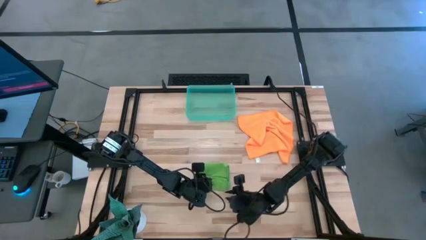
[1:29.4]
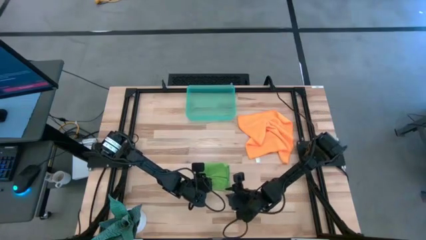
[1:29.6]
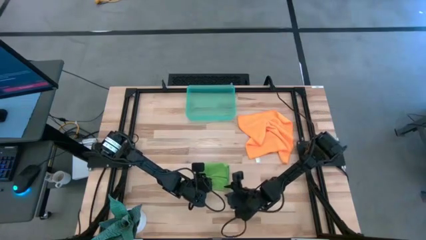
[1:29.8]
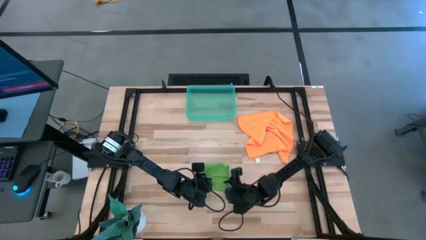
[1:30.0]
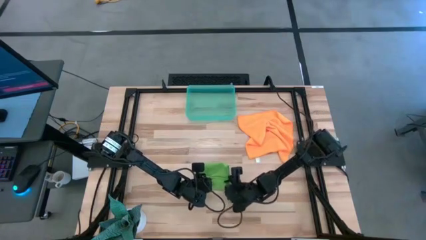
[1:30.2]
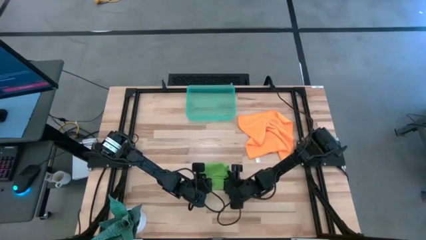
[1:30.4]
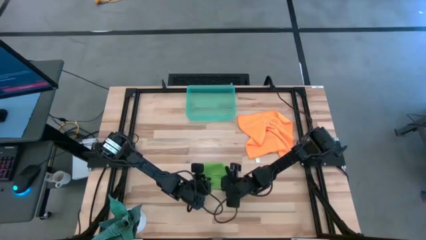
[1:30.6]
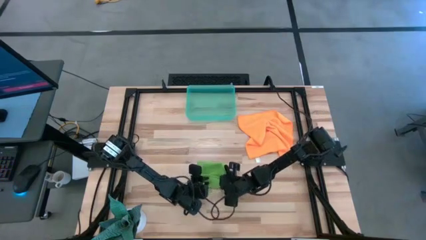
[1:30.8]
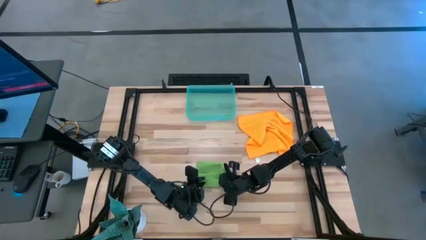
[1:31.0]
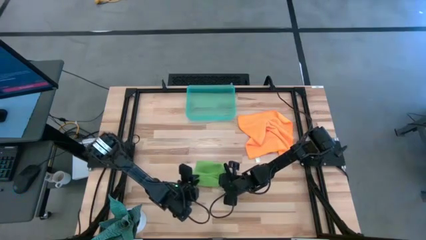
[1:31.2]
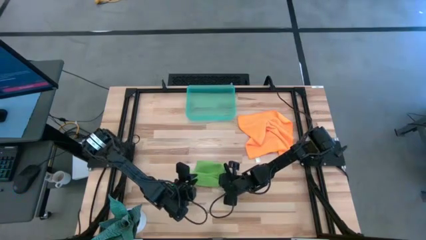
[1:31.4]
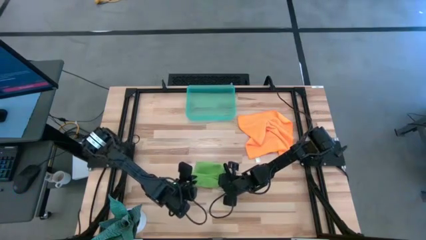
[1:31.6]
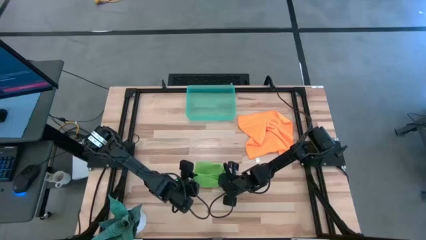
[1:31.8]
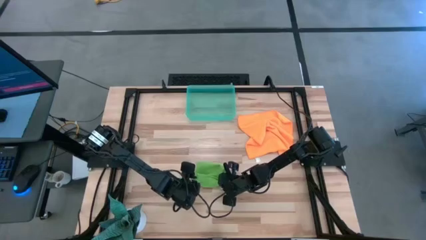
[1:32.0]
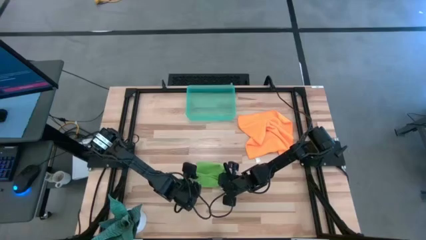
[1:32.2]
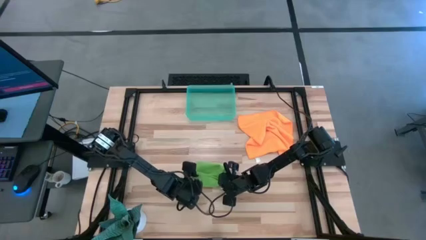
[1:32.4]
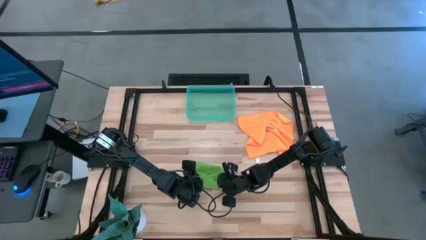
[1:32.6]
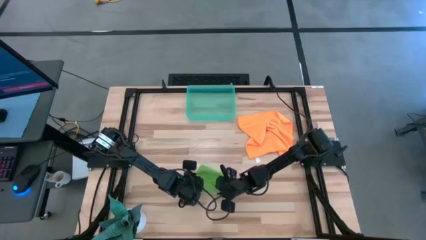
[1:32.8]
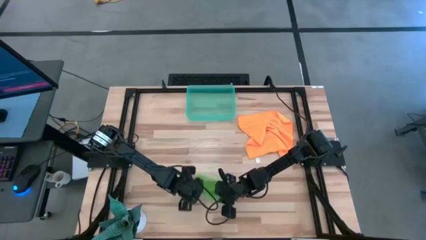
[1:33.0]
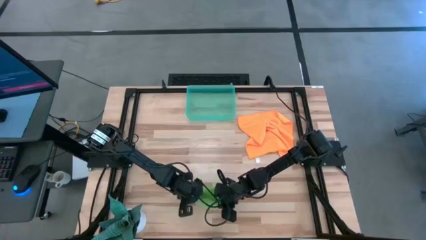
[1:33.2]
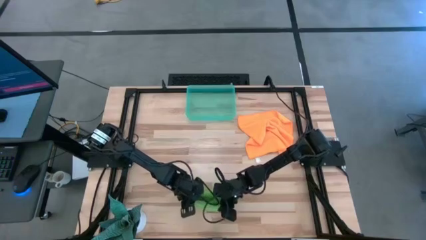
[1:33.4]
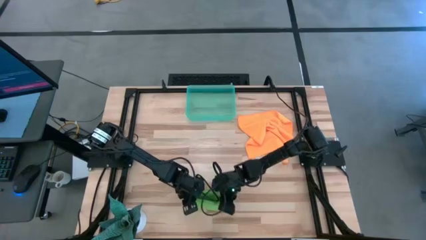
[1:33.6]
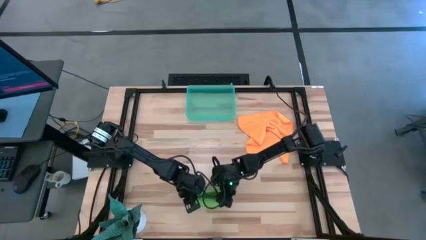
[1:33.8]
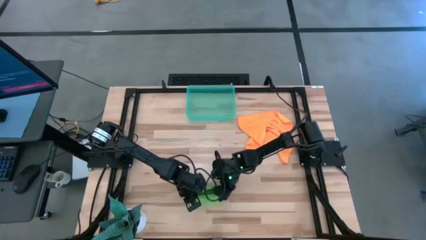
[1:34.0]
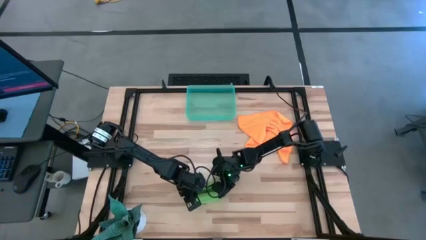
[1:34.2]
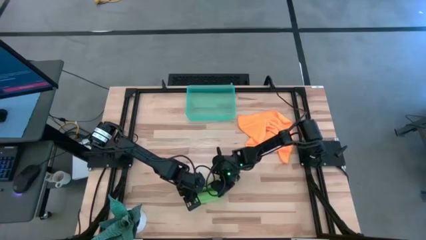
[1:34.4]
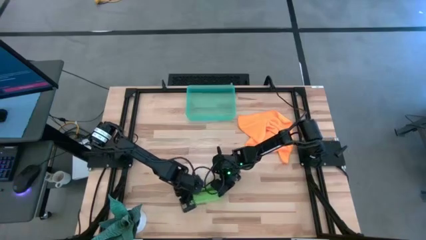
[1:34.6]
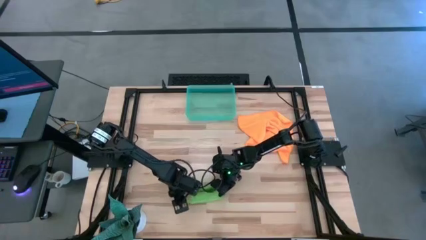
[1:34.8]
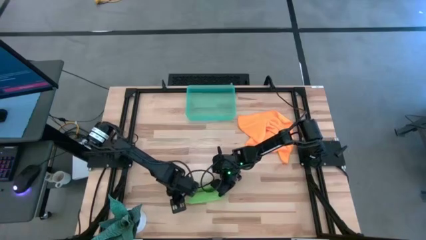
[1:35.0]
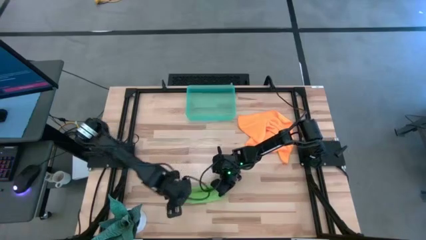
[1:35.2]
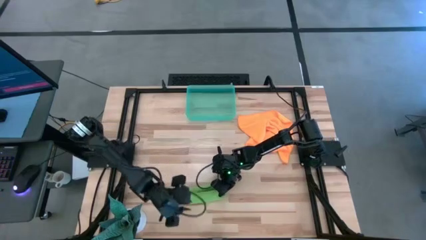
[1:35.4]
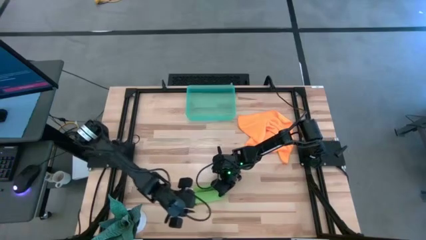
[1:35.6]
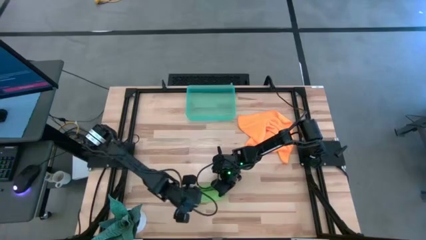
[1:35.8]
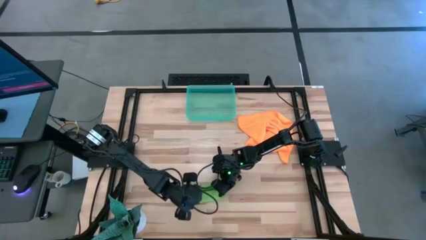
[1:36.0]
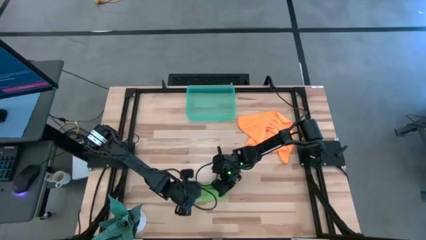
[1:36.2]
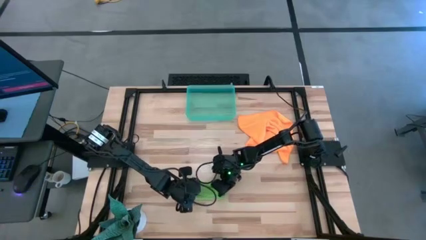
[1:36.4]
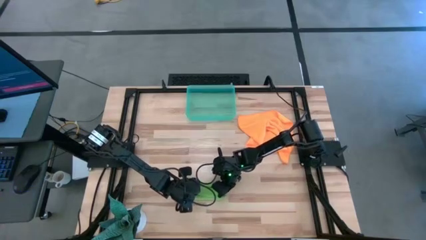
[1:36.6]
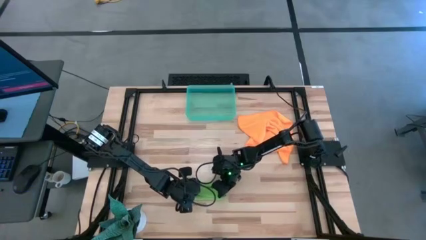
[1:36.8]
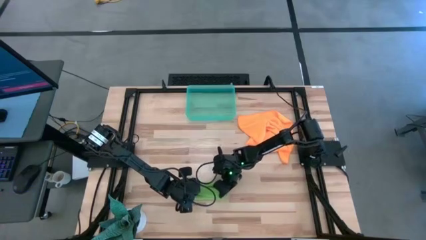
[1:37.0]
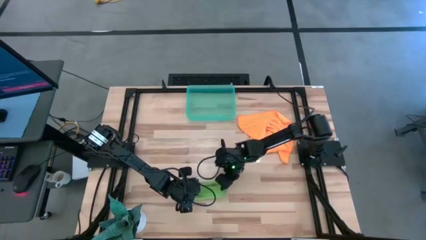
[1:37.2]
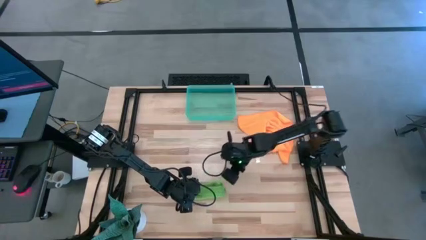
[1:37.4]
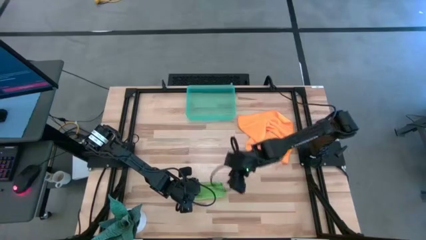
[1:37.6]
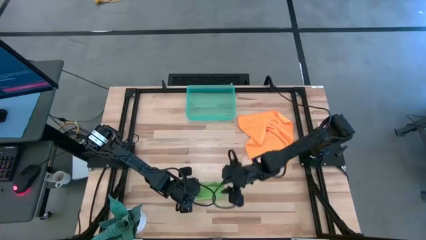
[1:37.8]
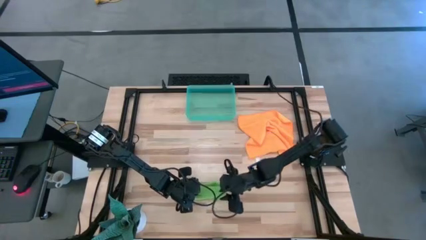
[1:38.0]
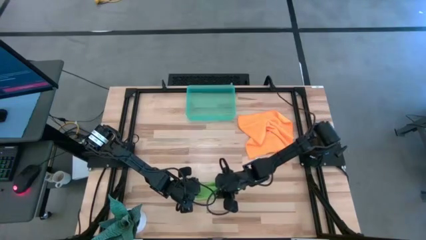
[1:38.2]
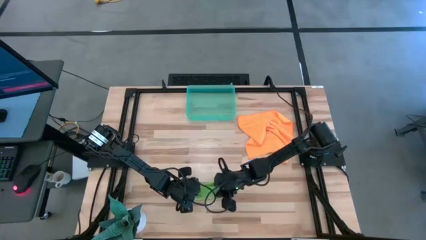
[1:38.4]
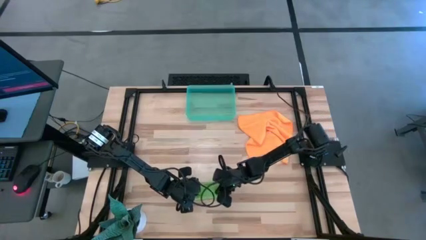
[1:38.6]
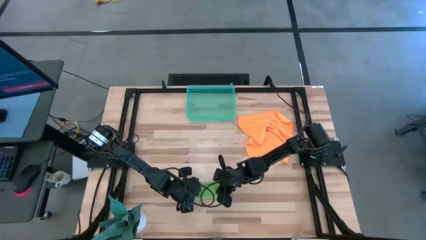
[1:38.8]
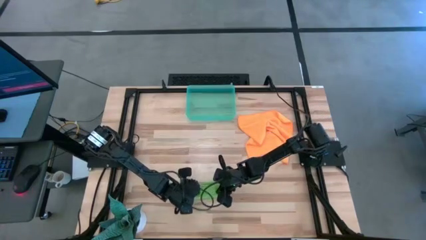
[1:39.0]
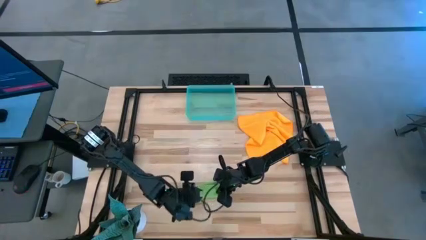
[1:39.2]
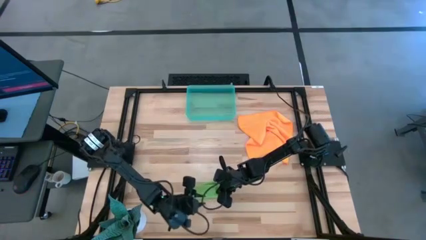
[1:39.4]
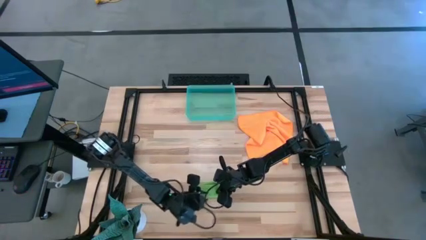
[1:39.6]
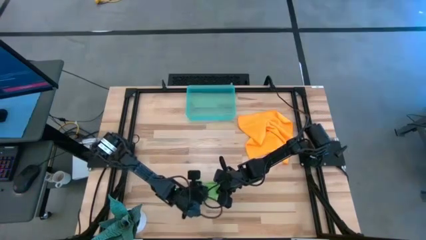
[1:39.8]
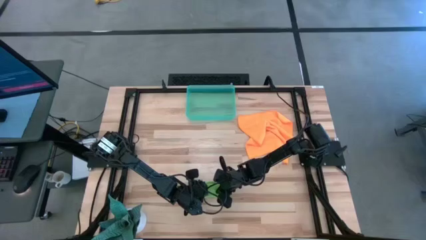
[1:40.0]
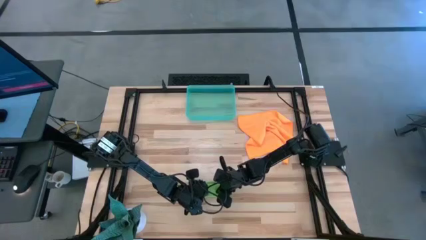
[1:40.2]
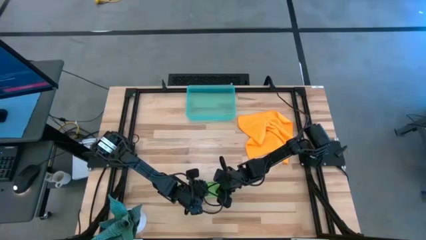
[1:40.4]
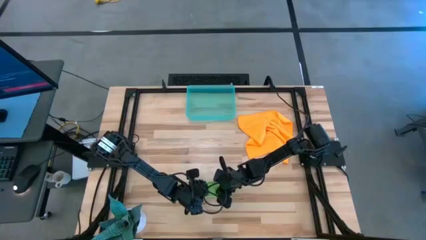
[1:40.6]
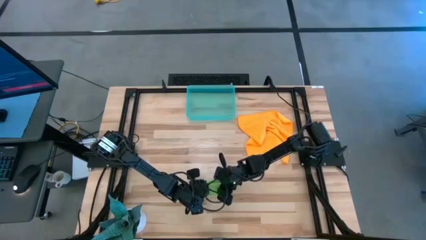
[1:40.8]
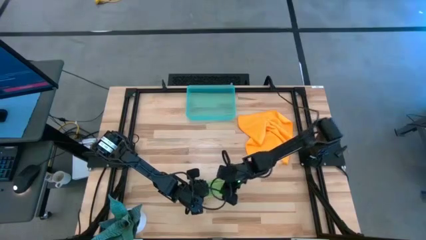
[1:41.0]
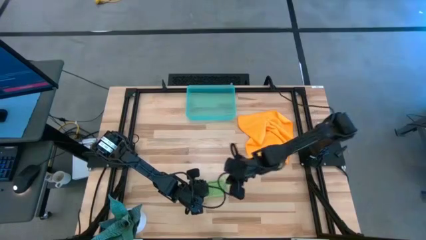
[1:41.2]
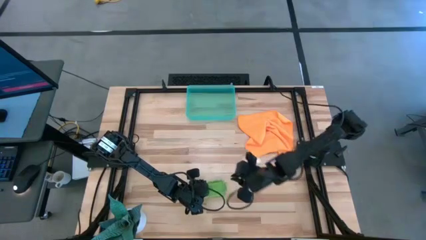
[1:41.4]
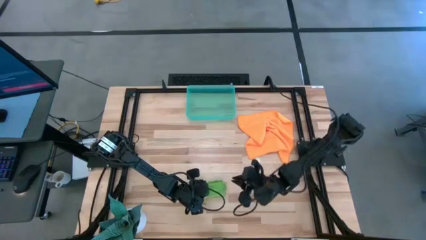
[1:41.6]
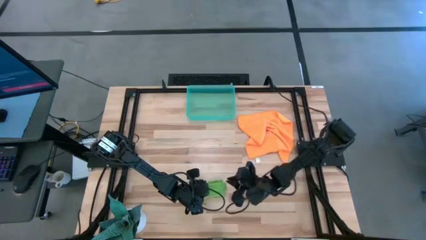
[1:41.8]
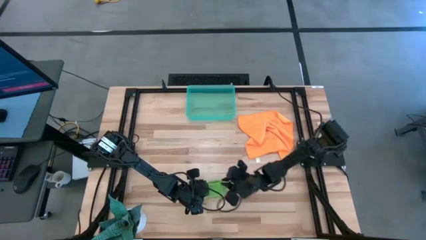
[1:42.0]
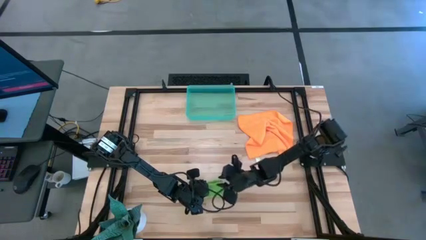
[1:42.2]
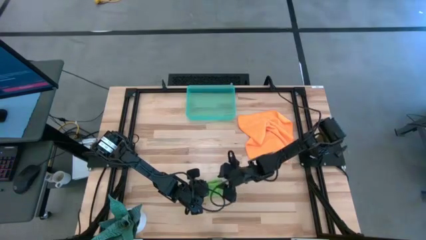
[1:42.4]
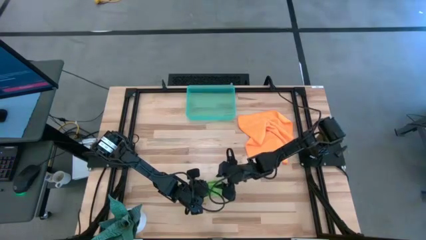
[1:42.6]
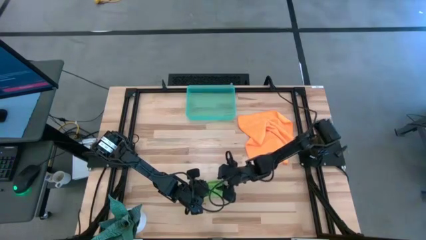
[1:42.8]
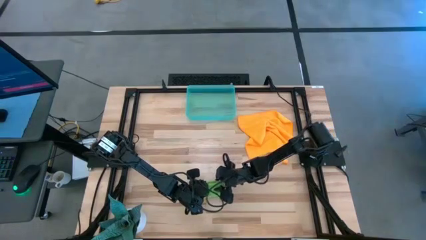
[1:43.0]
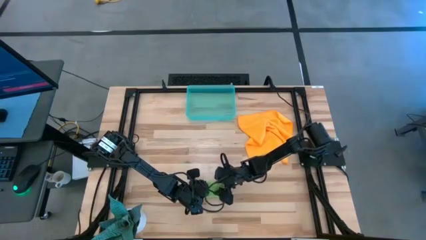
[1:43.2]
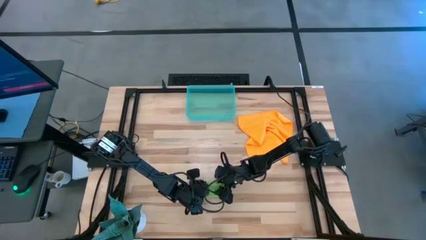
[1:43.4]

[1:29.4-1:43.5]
Task: Roll microfiber towels into tight, uniform cylinder then place into a basket
Roll the green towel
